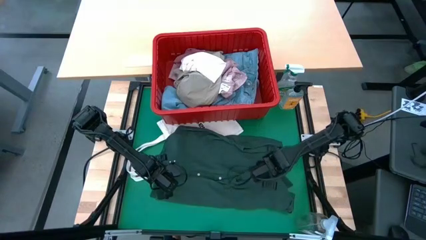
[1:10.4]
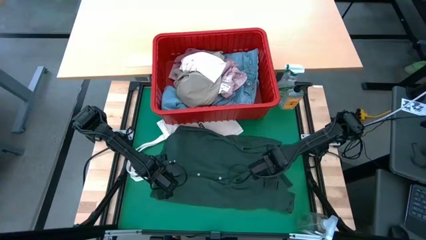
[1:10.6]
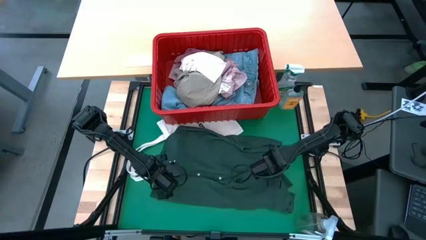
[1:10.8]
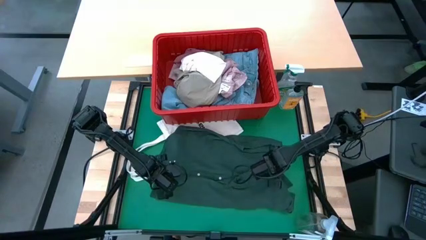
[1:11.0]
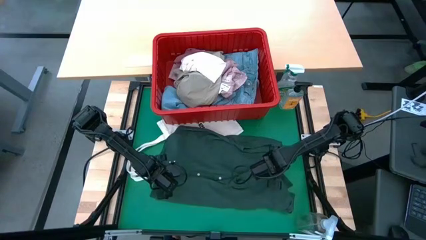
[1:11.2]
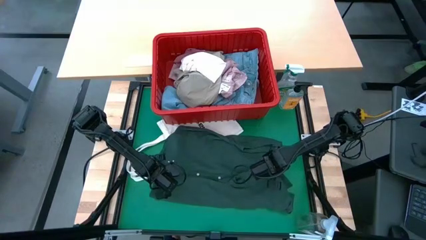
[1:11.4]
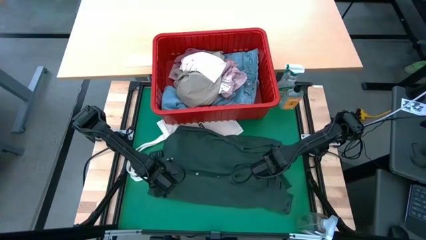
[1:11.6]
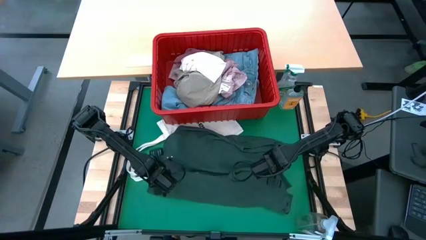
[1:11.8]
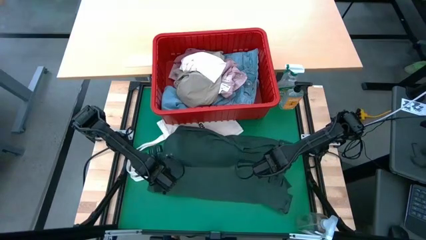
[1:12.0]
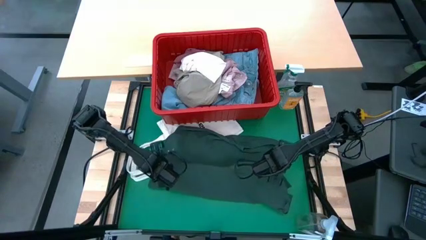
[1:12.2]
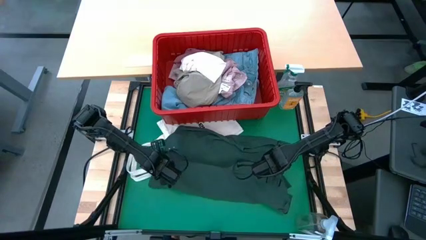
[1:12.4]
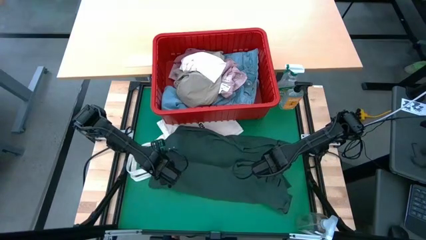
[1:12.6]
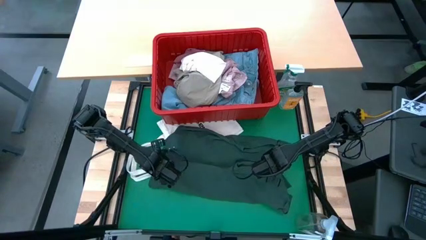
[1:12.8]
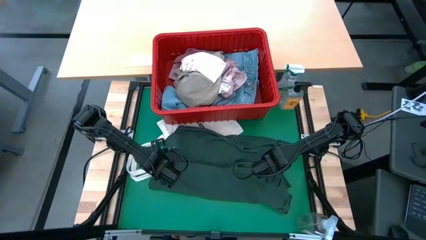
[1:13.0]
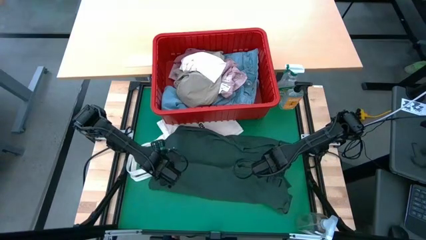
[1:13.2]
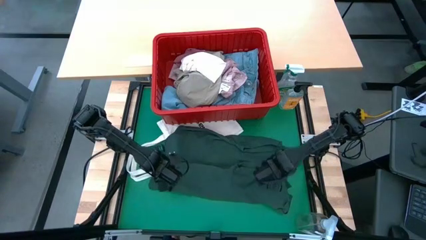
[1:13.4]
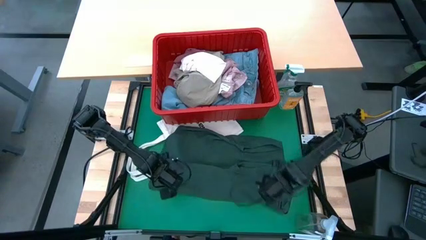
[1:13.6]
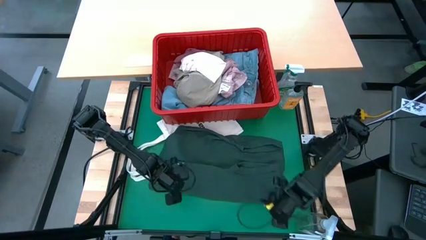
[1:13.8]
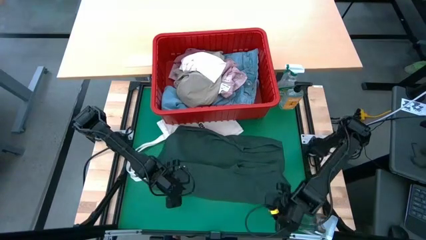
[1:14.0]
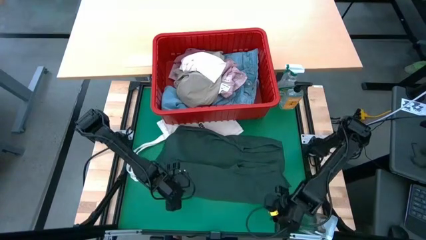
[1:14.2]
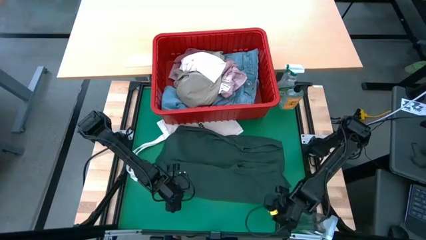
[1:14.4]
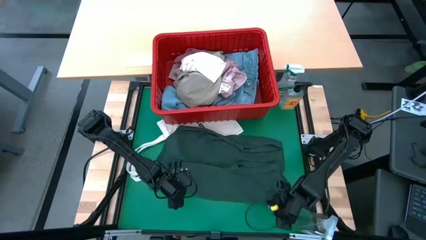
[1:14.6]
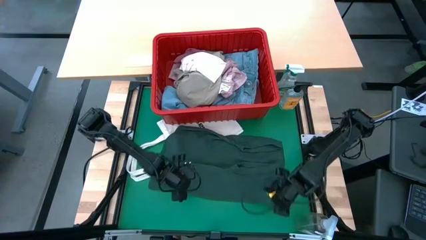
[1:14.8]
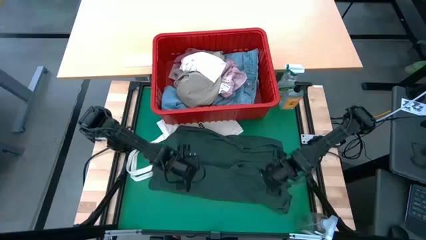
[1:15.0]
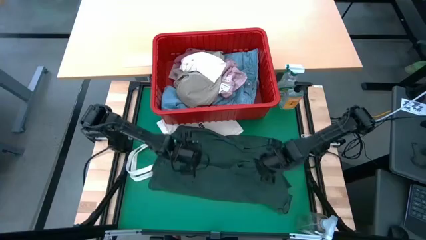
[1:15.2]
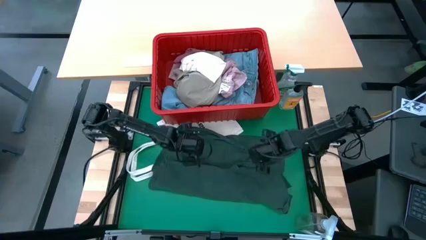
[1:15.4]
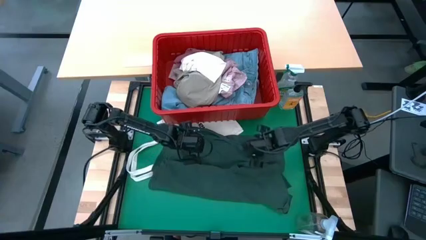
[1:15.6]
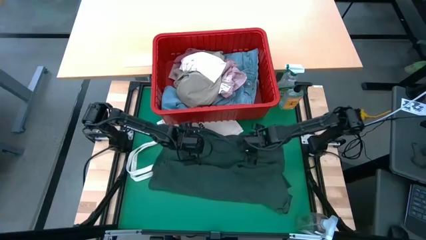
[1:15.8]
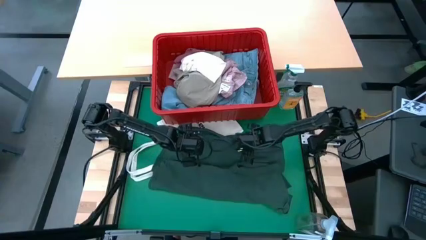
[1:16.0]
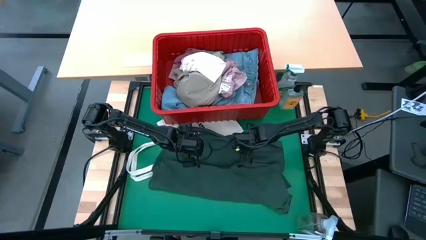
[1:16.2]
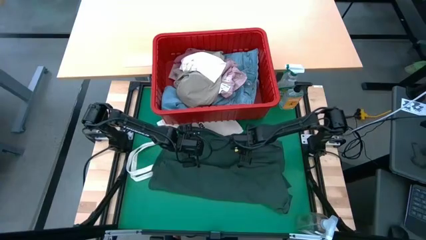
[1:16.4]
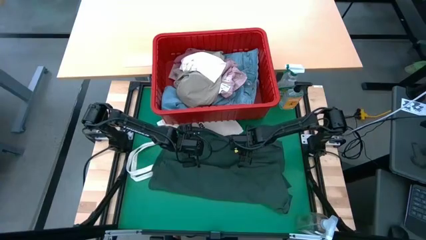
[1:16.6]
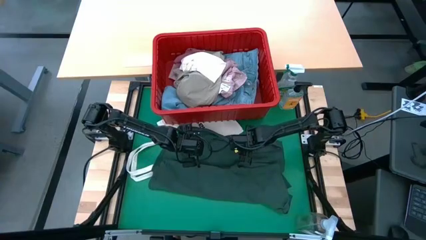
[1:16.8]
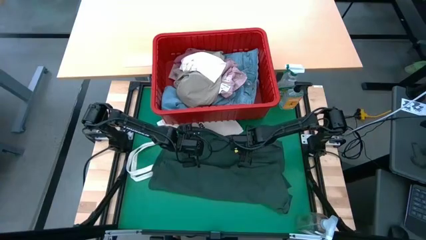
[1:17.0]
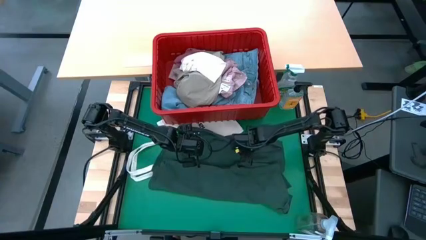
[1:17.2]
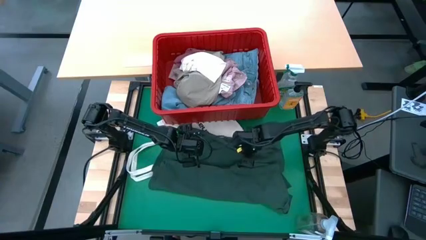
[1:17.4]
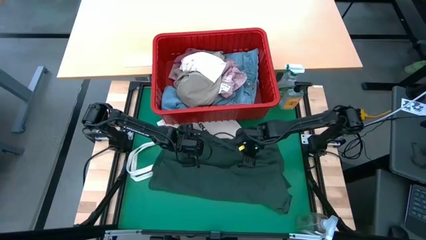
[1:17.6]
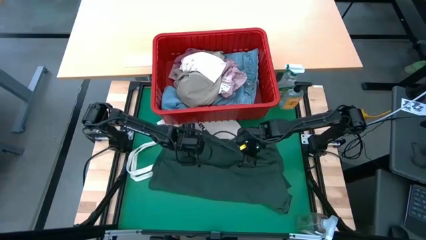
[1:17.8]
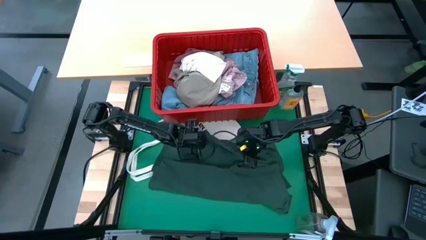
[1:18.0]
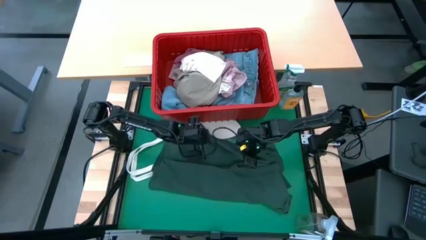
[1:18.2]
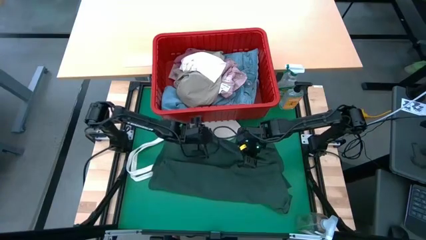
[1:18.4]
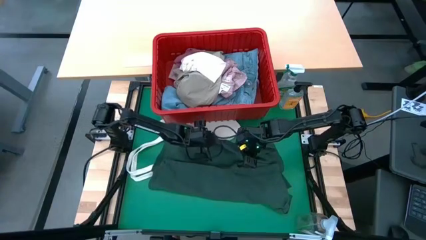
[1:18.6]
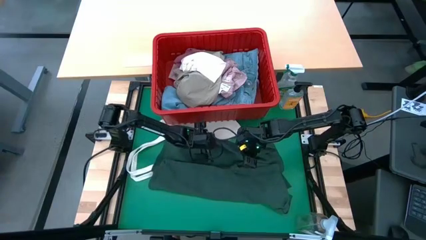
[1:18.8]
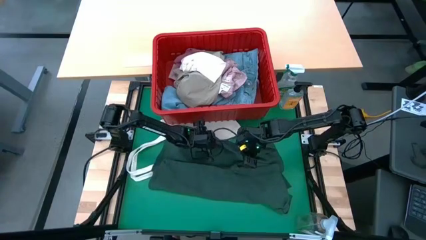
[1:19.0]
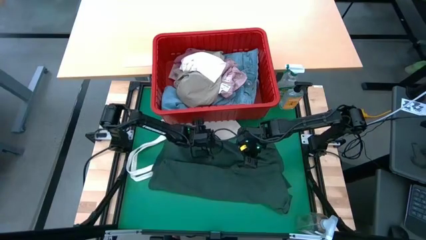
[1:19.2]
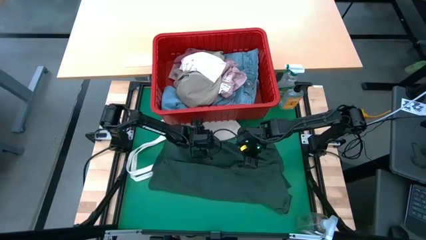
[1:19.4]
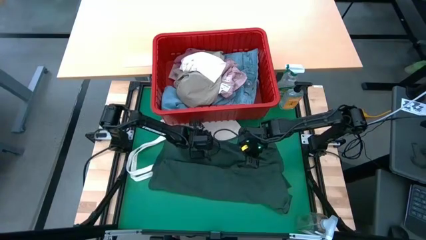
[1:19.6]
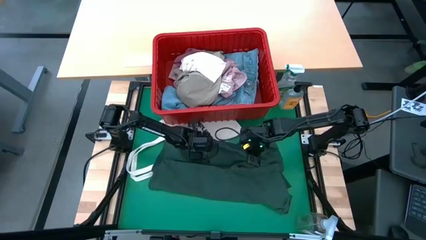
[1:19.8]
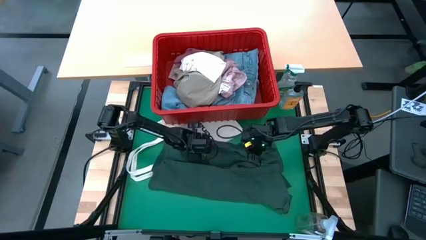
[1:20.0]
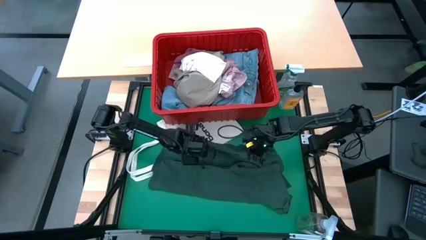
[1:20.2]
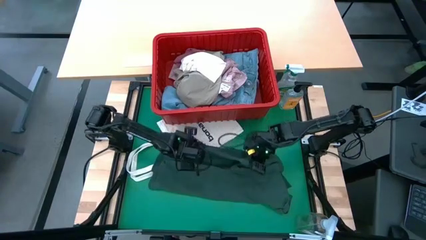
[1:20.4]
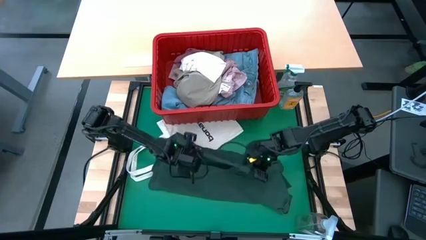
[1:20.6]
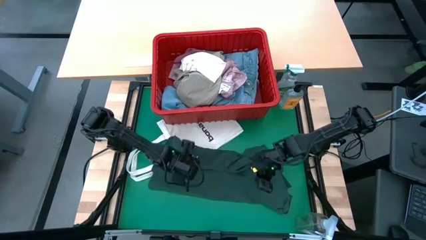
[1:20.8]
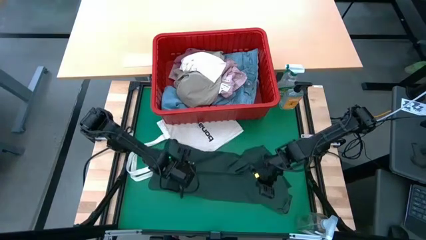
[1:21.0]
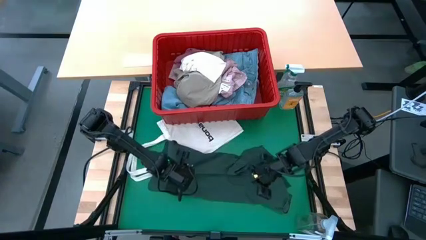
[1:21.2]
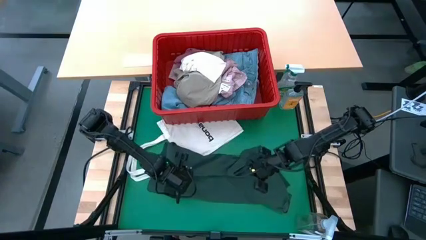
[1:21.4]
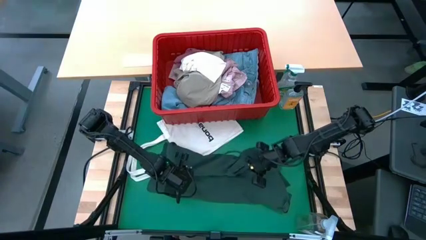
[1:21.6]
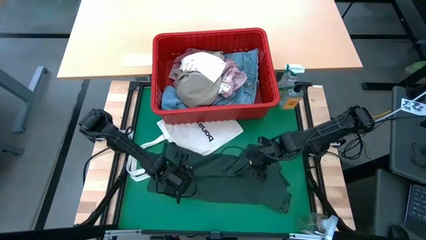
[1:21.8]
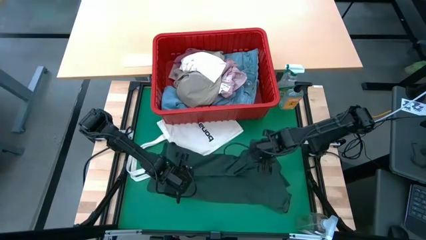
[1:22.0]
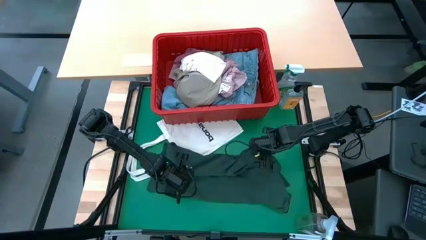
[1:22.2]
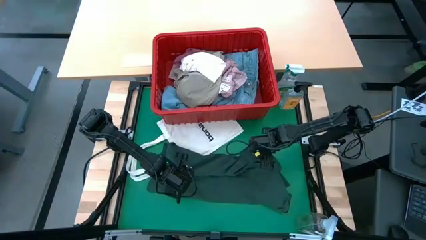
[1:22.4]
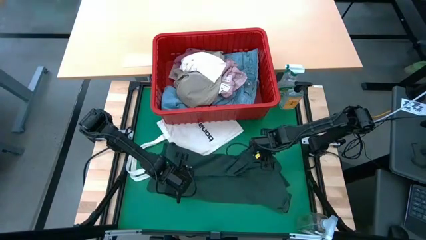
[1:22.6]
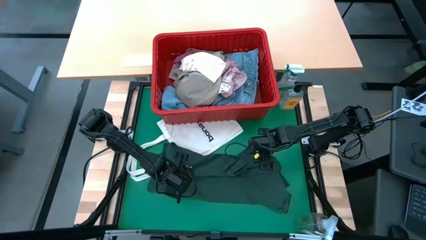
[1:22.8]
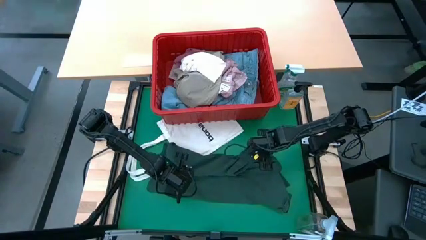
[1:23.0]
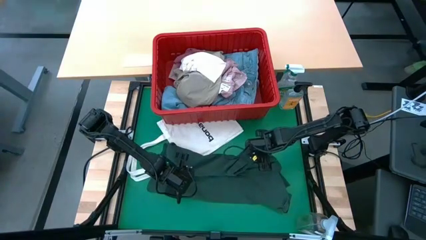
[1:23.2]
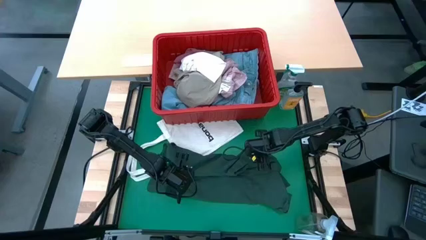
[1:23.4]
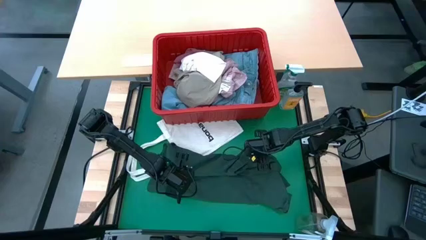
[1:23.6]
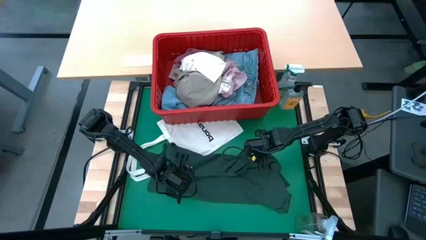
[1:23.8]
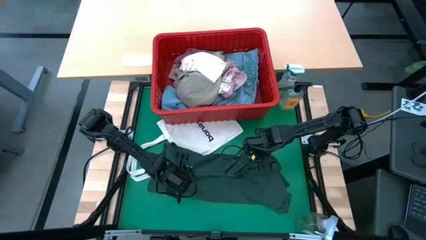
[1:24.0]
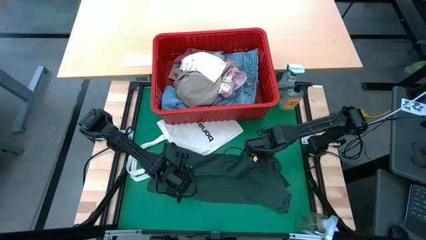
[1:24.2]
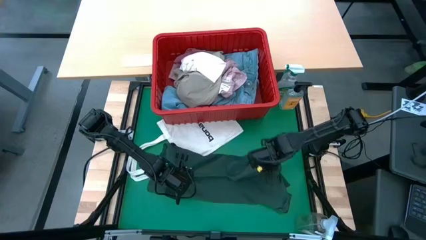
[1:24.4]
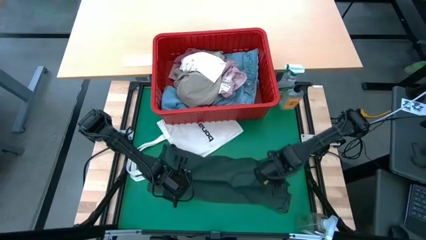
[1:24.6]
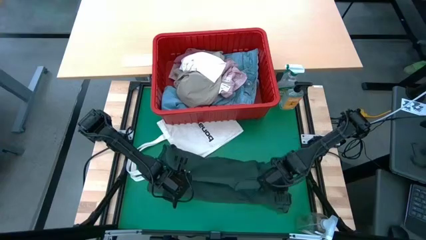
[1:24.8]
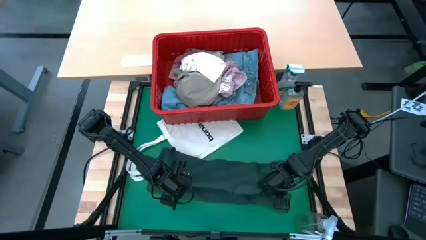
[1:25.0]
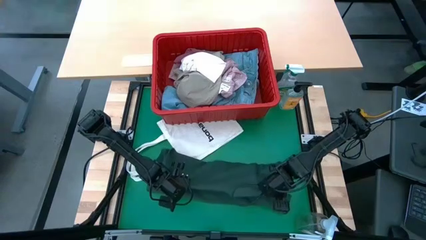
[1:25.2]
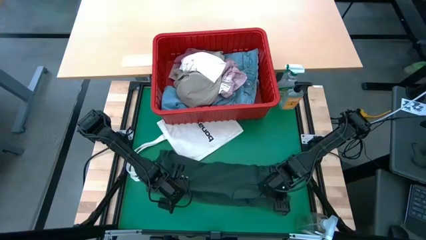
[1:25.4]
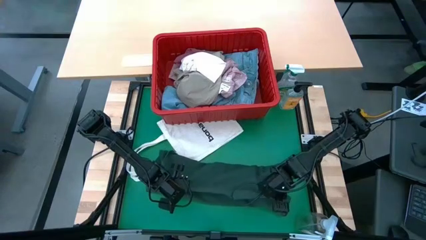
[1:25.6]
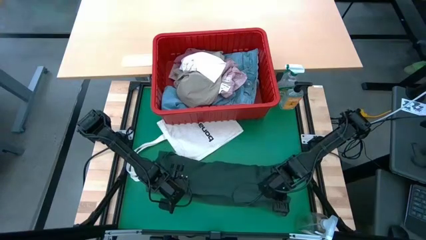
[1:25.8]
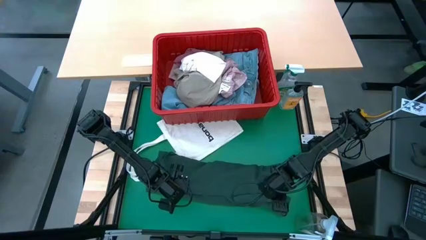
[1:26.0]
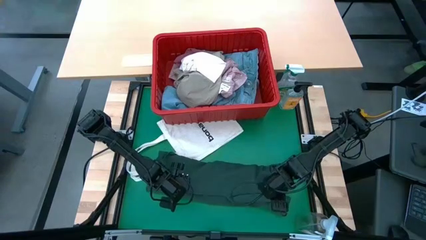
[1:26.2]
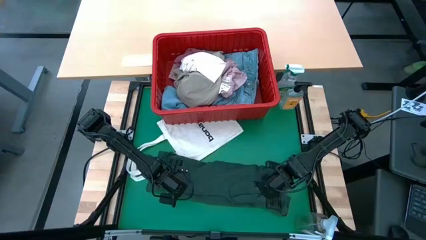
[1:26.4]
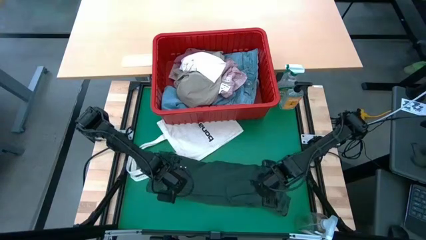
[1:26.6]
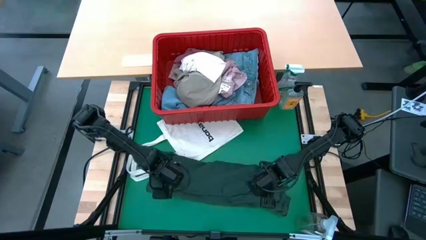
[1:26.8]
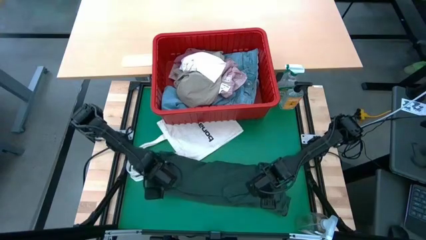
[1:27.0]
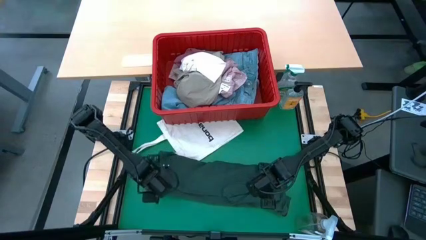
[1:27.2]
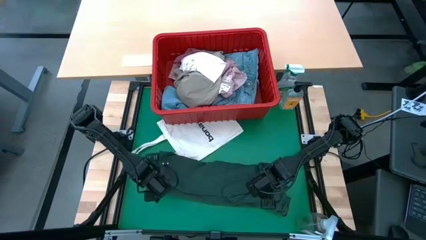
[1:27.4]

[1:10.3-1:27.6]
Task: Fold laundry
Fold the green shirt
